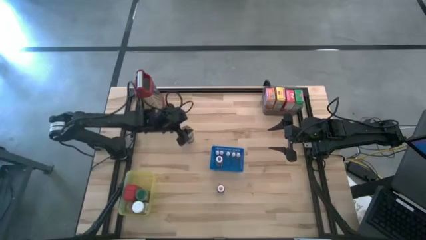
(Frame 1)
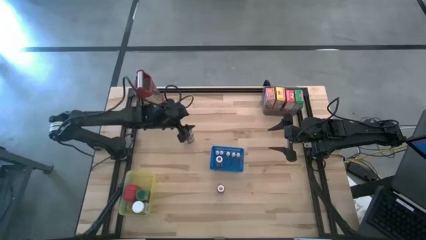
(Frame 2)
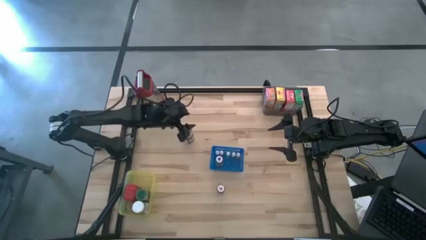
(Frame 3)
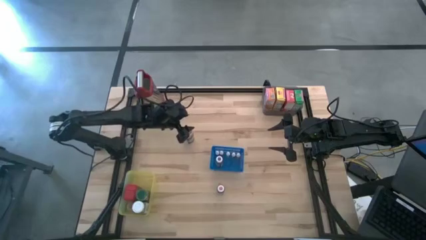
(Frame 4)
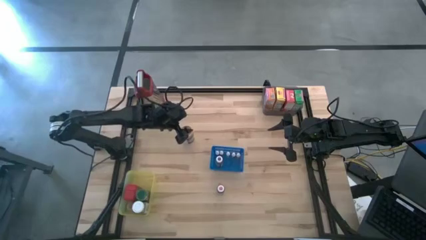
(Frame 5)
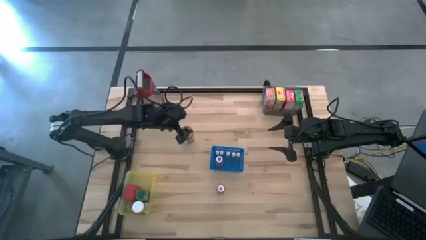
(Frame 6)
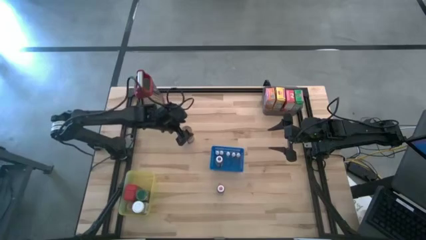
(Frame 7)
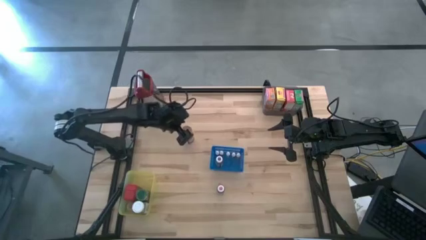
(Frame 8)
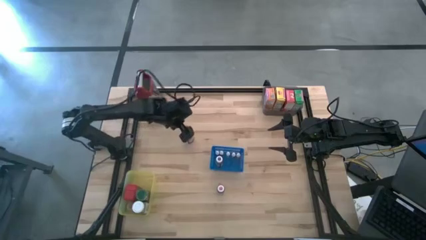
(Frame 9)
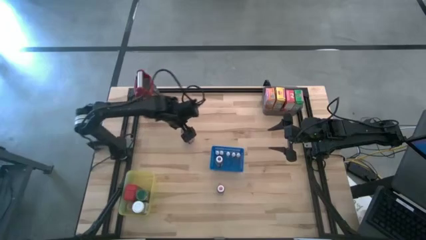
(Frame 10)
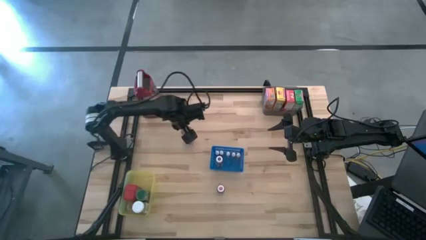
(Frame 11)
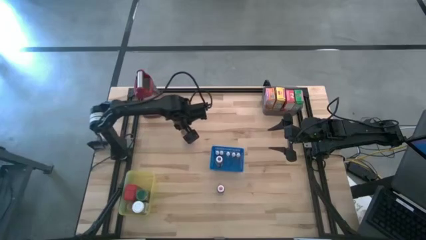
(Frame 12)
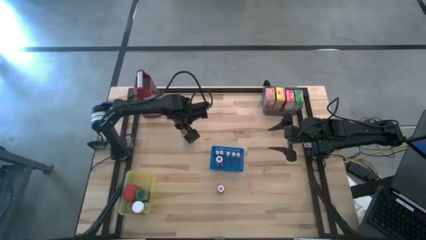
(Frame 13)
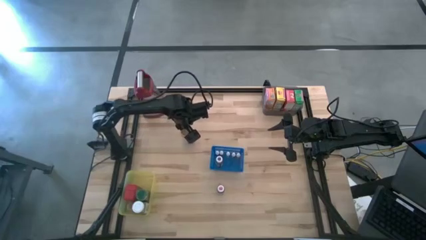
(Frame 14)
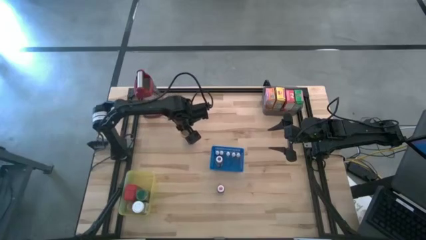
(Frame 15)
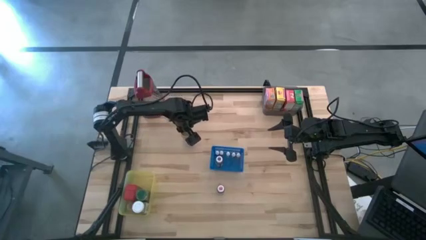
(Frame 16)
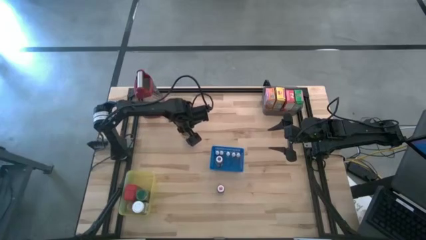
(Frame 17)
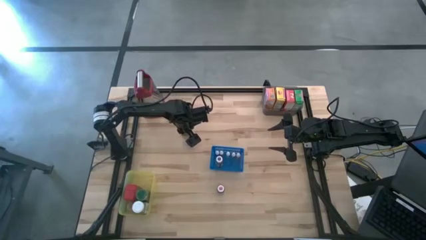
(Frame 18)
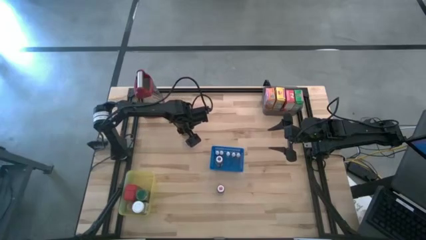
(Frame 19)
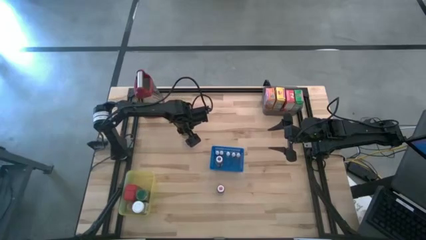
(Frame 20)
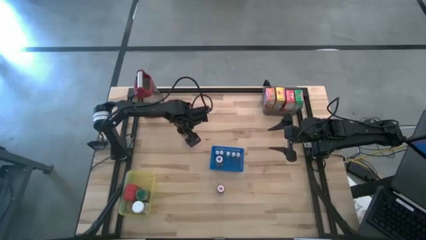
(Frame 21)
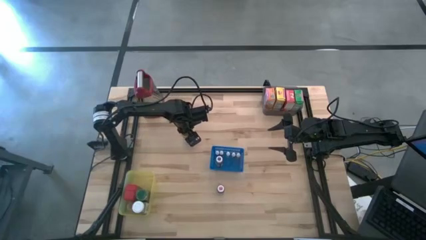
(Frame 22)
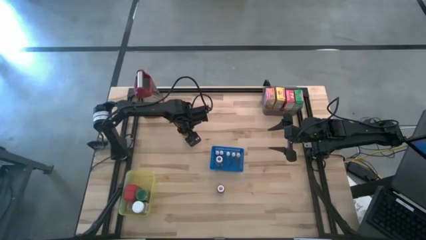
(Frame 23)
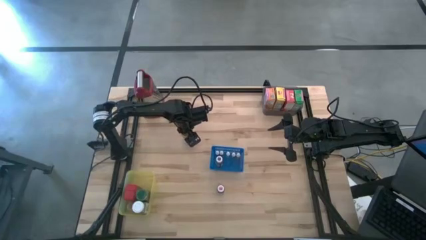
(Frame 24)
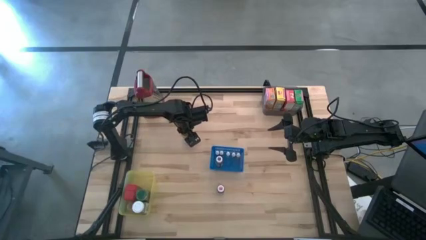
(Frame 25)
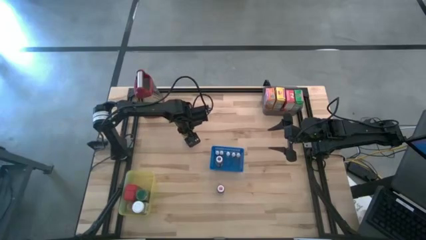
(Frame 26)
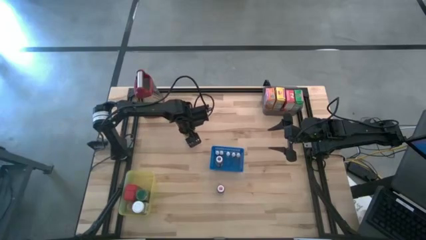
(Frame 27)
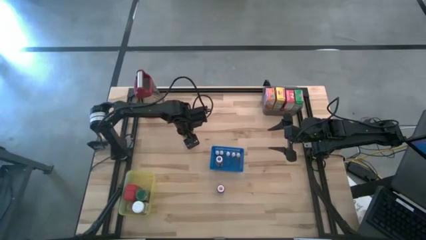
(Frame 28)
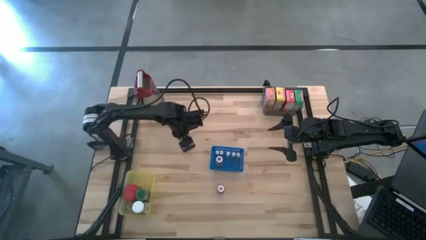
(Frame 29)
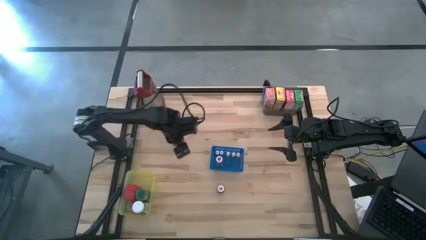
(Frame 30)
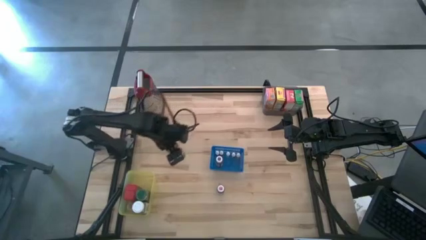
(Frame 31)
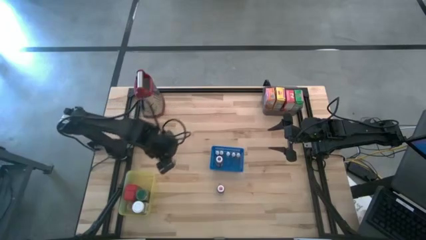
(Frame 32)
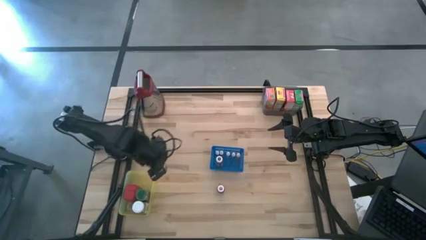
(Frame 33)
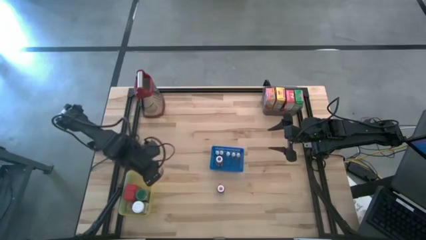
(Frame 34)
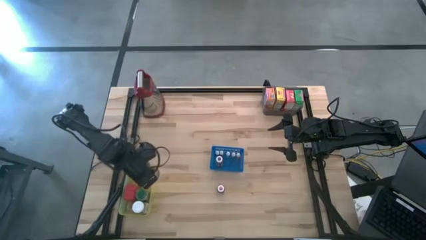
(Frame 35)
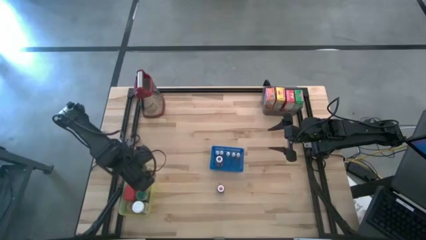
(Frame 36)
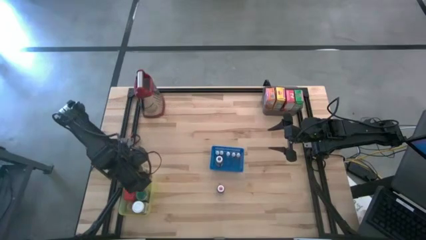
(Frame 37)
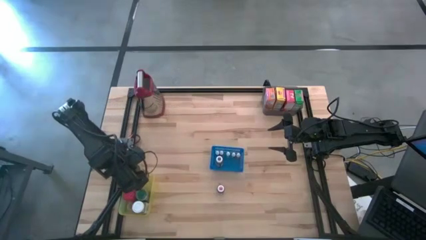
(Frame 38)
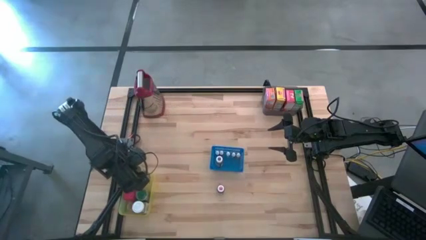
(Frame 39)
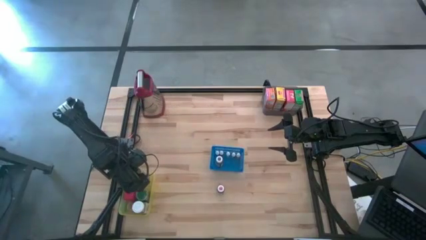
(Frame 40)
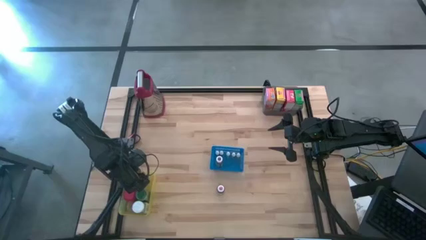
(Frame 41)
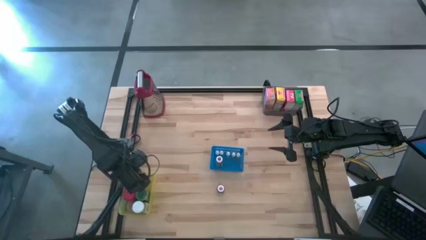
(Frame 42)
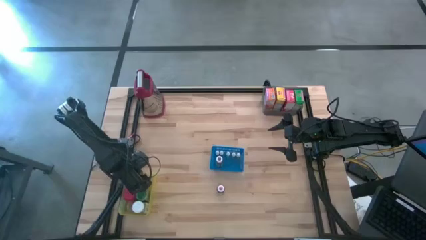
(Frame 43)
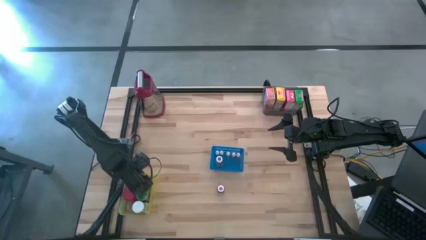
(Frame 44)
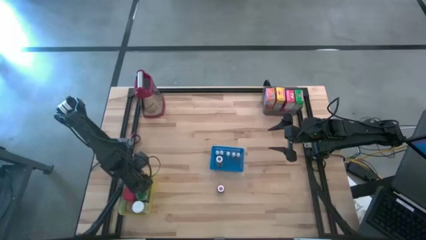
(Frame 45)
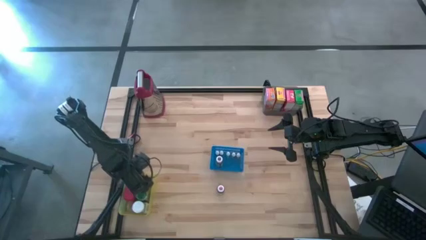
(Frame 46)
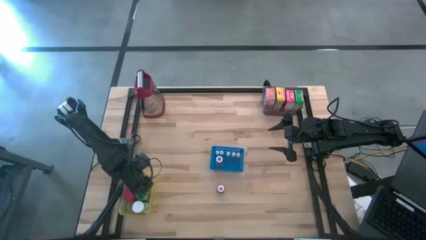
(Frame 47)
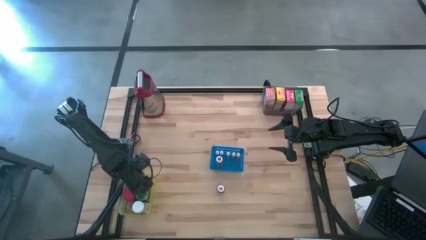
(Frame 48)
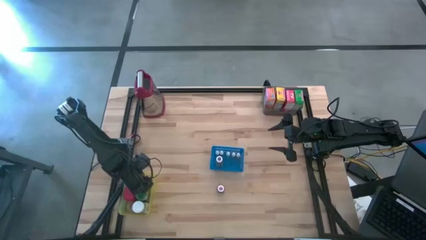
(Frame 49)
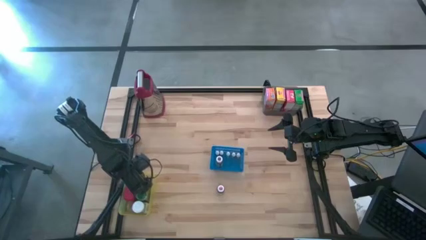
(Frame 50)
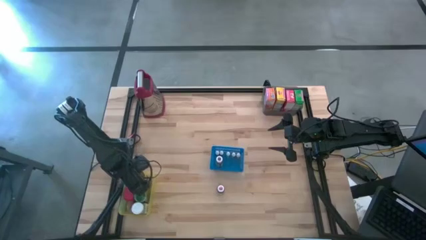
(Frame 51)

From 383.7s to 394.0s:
Task: Pick & Place Kitchen Items
Put the golden seasoning bottle into the yellow bin
